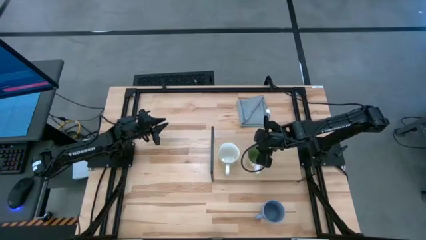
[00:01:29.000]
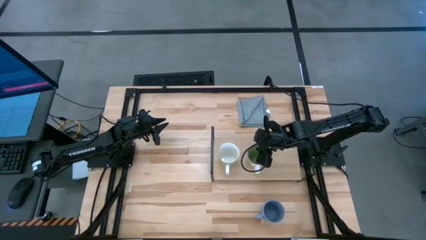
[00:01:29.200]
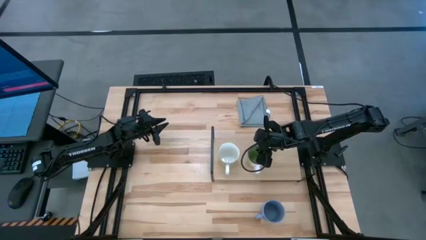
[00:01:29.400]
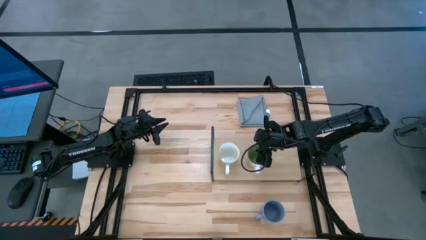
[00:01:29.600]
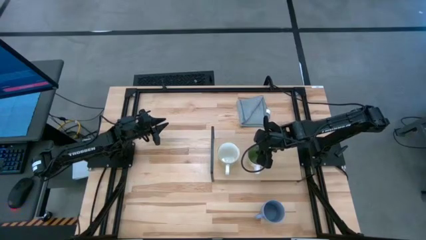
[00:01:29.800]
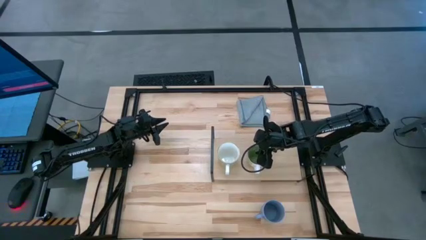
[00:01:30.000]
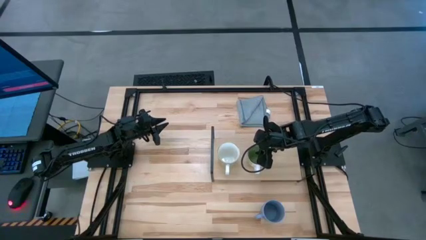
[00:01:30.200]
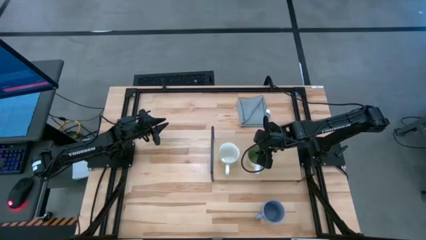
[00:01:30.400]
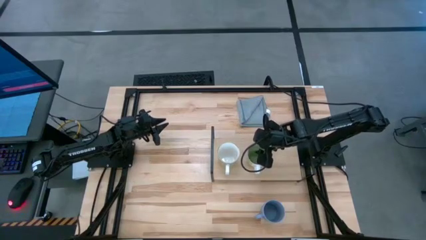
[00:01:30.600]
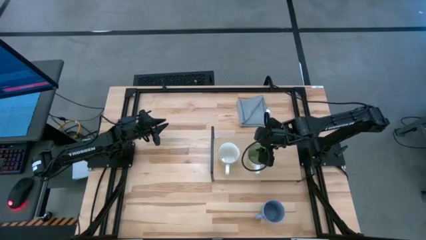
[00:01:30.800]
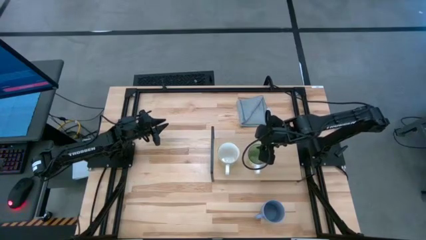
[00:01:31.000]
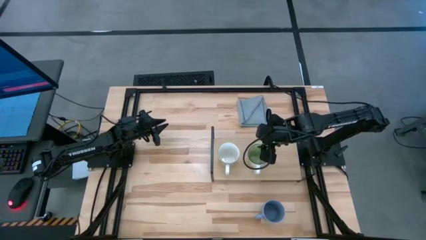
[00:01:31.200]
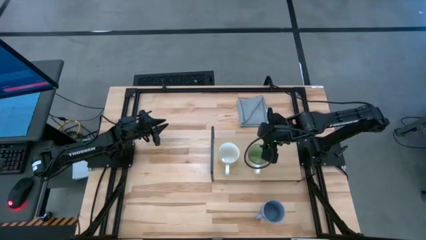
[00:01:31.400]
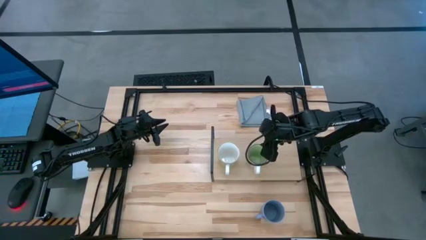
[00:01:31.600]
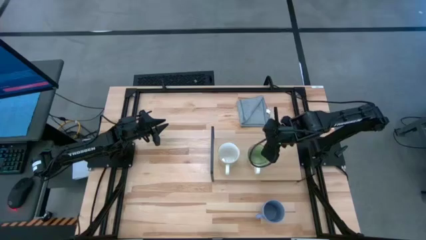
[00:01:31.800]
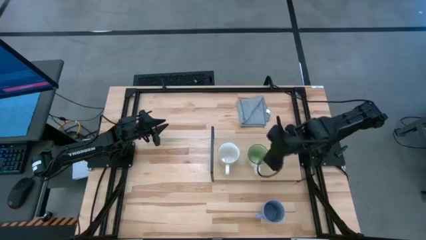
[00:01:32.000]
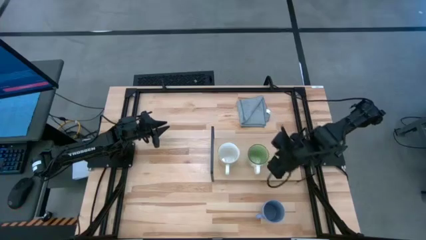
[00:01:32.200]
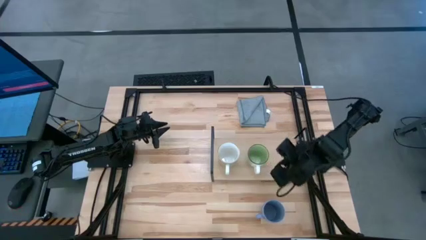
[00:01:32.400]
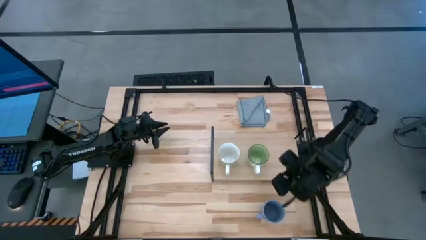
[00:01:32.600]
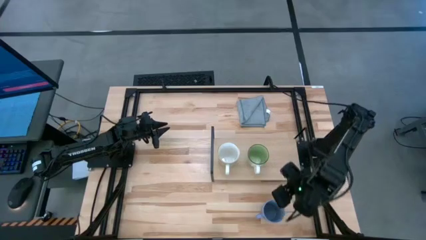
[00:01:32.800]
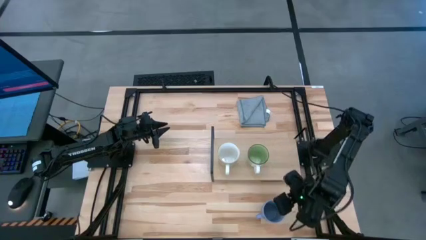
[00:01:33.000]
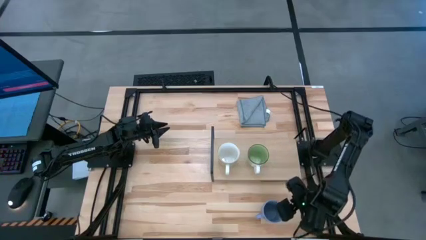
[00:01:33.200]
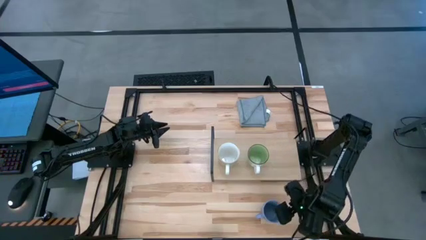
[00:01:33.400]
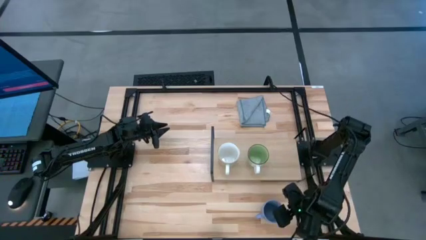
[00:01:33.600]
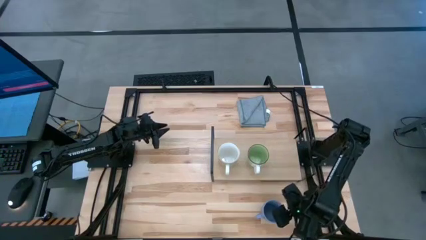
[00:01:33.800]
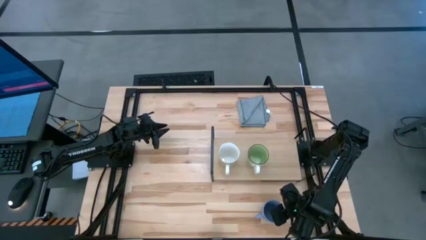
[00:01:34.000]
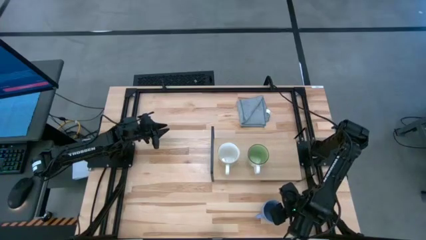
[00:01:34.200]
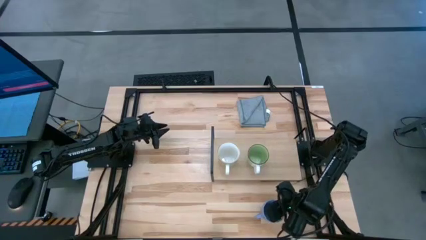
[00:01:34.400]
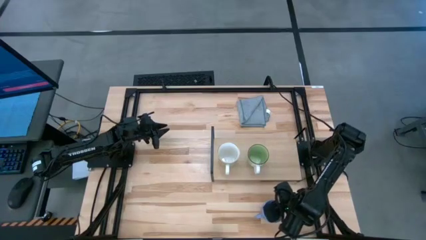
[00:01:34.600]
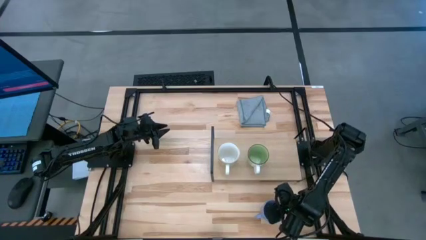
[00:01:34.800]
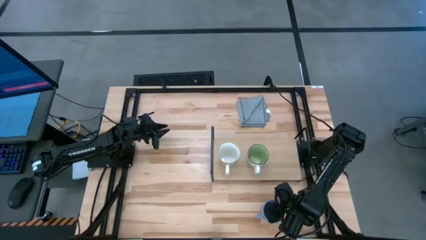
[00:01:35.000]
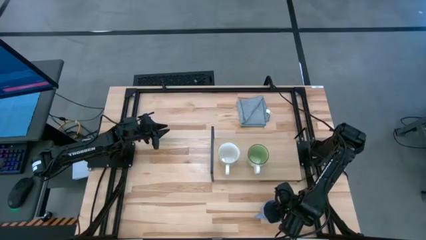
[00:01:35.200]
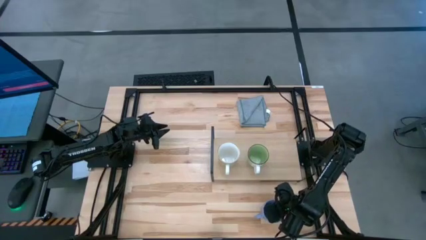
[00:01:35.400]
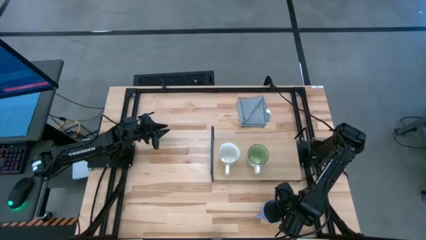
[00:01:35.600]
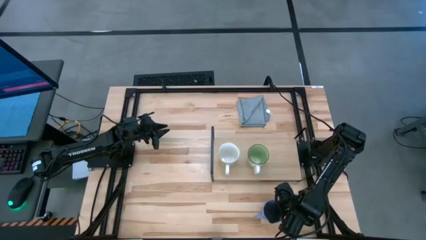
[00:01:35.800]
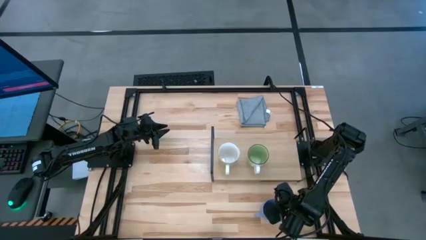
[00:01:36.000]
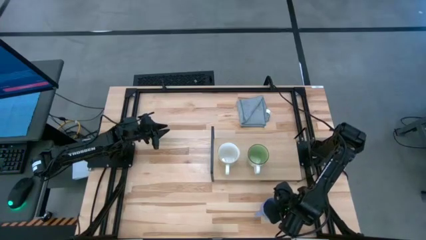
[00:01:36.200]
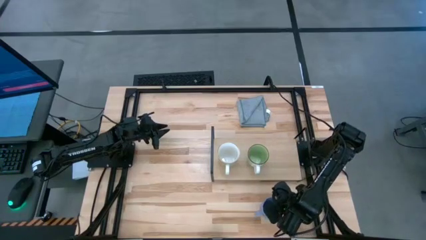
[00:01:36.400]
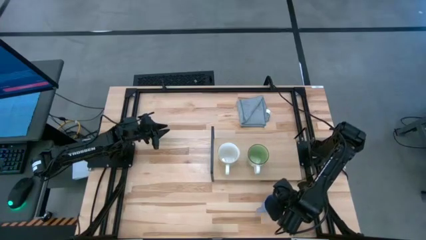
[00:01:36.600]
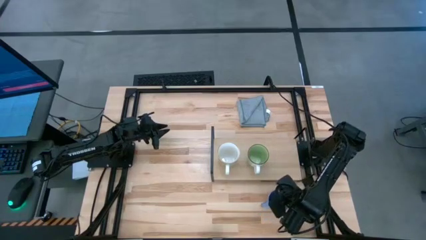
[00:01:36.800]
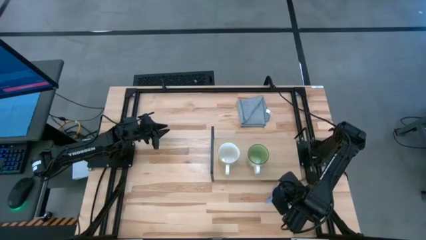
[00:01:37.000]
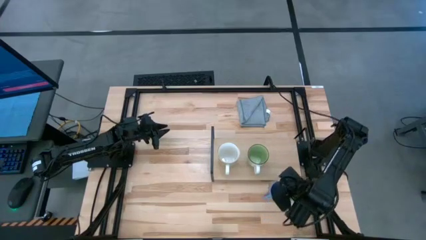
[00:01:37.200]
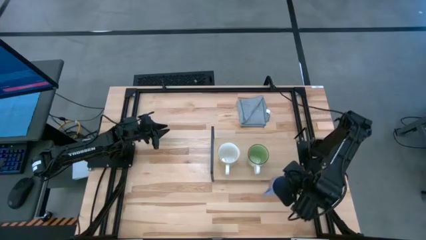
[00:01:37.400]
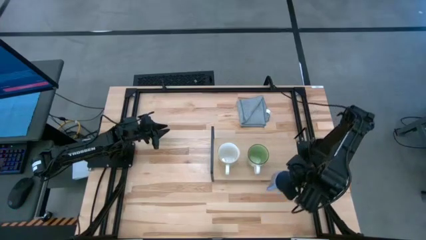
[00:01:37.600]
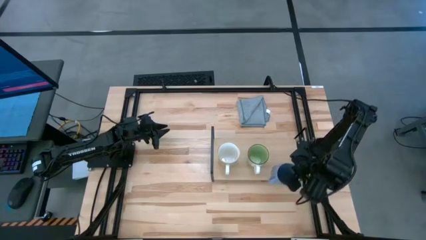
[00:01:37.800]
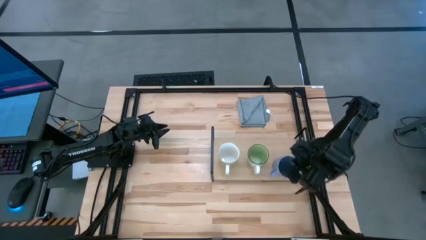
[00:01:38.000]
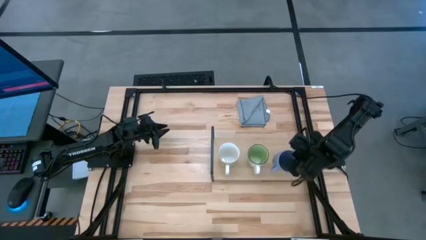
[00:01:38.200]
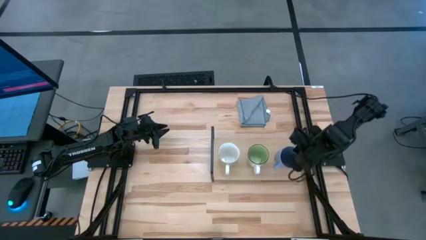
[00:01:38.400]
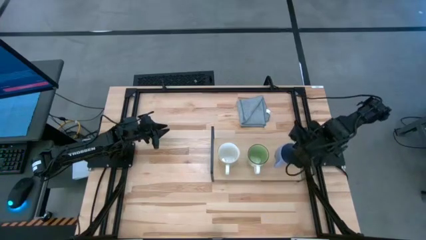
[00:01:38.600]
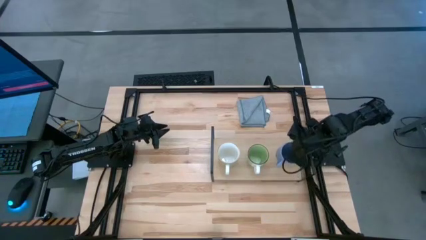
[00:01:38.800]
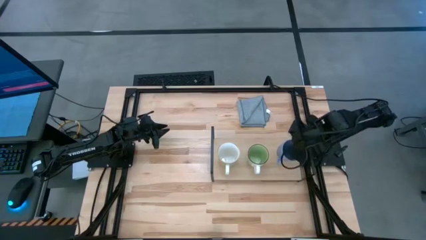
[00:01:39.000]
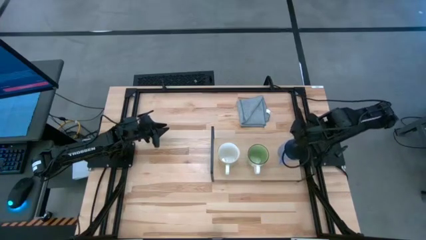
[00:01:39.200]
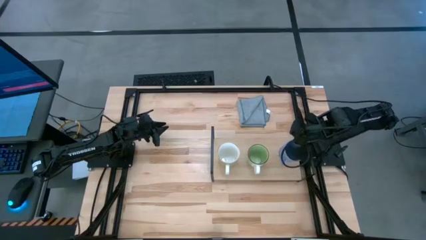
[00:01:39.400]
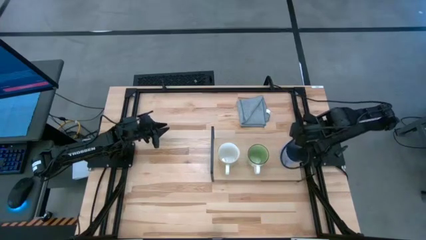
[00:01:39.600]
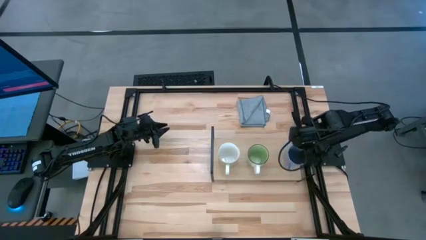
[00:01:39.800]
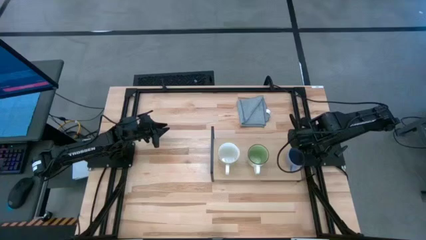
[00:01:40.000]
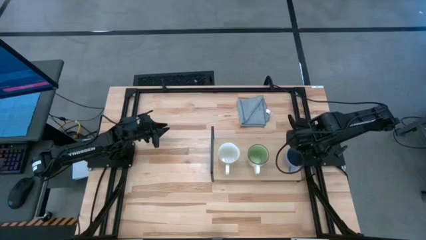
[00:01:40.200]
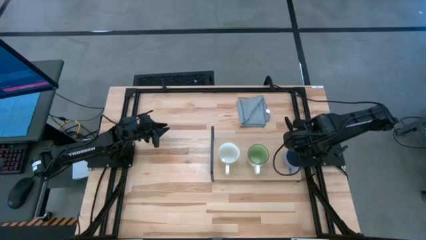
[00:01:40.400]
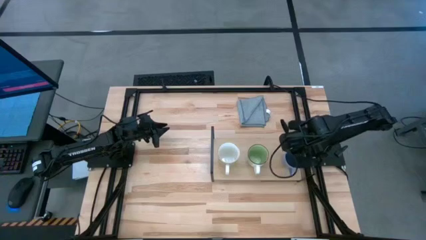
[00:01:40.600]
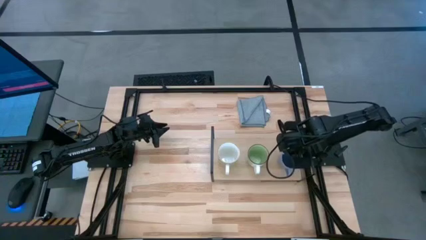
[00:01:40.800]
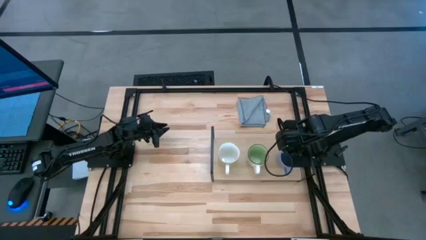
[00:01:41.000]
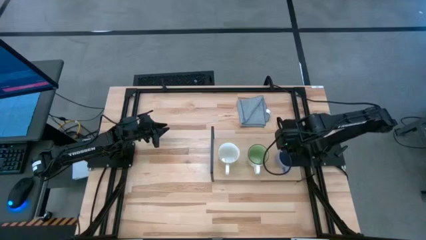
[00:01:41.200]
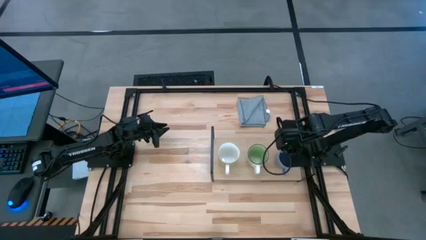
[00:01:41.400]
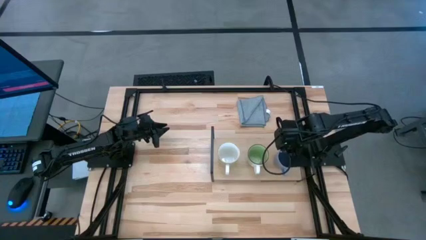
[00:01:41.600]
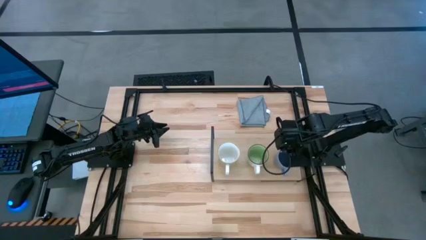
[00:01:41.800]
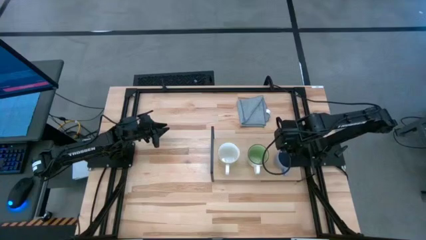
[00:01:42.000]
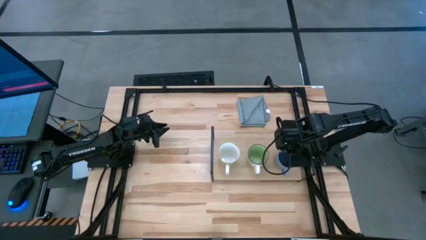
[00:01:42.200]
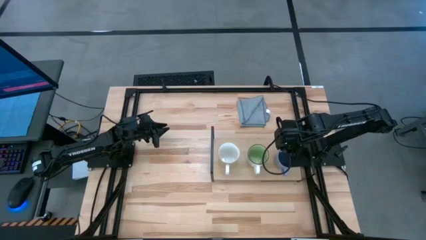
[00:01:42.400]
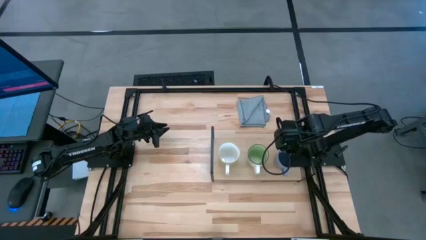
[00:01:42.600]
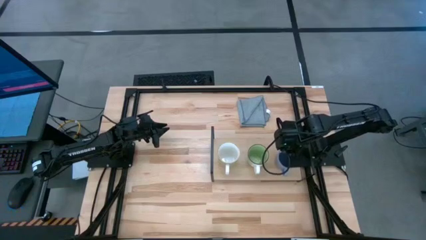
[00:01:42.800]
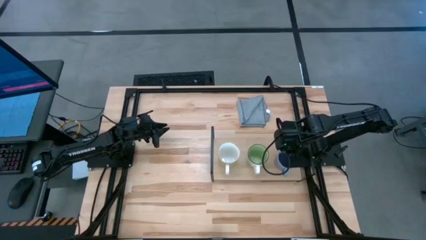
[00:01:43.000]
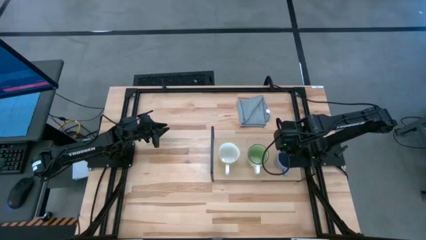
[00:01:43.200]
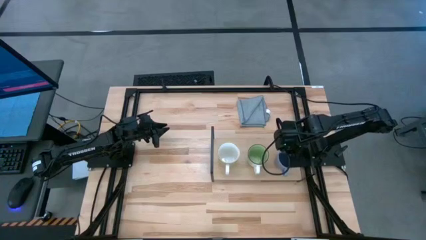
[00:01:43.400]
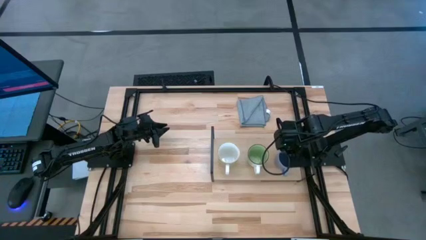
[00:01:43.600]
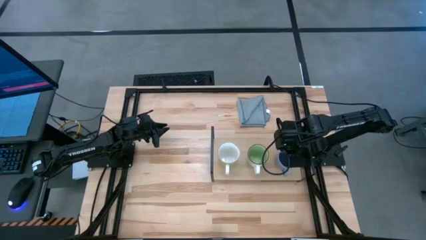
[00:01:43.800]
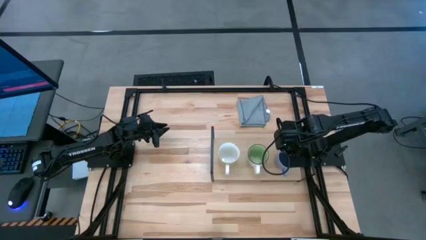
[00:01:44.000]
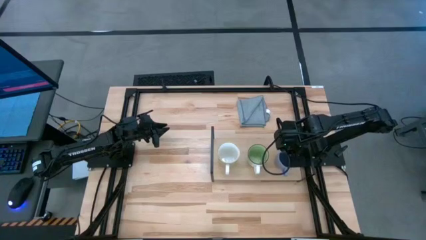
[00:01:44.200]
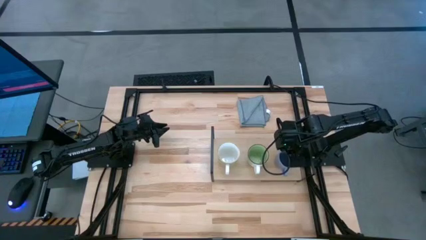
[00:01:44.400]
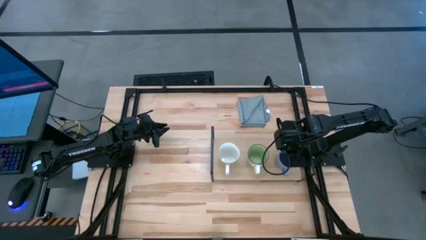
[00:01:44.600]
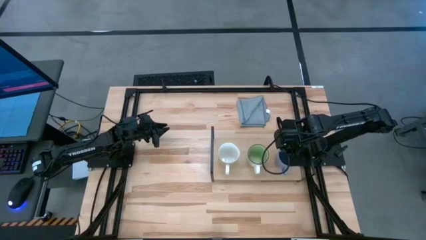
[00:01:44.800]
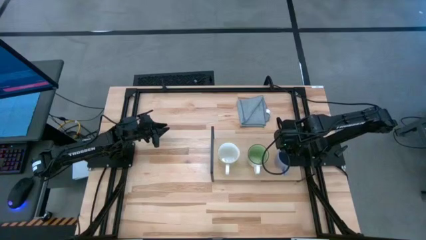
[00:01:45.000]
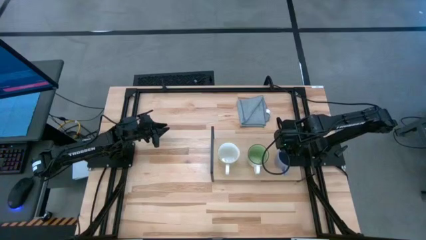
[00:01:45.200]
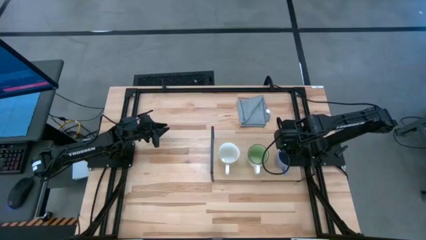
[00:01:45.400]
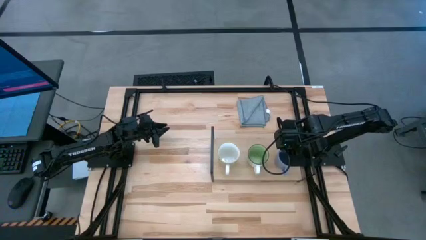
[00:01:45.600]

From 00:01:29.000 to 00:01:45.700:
Task: Stack small to large cups/mugs on shelf
Put the blue mug on the shelf
